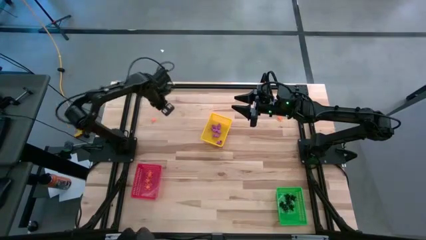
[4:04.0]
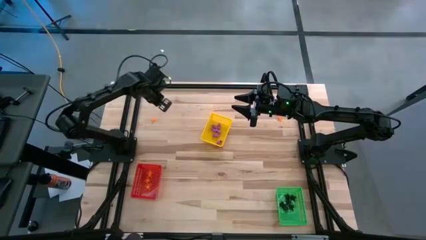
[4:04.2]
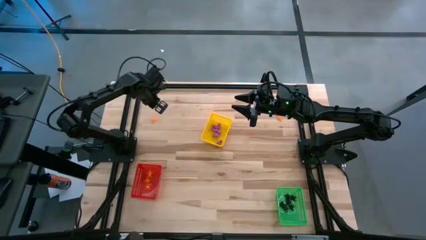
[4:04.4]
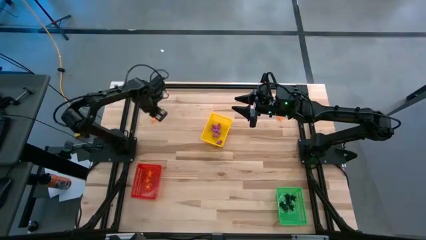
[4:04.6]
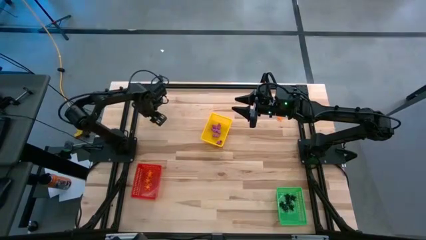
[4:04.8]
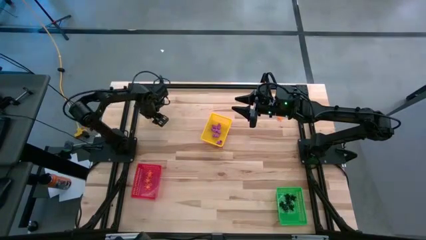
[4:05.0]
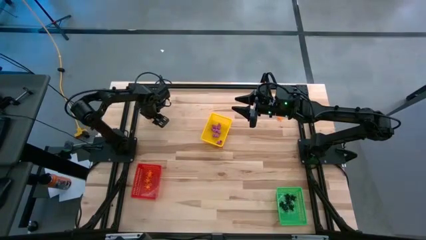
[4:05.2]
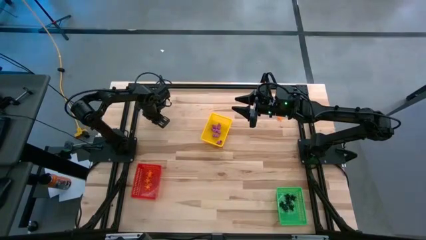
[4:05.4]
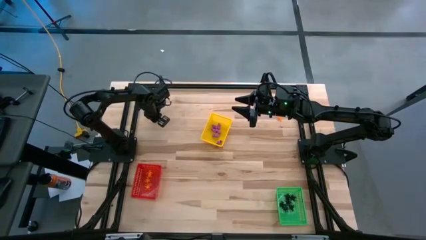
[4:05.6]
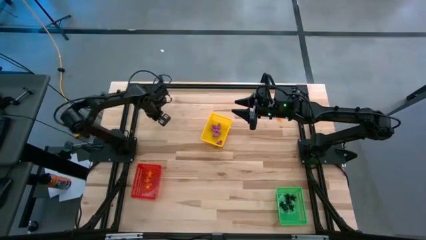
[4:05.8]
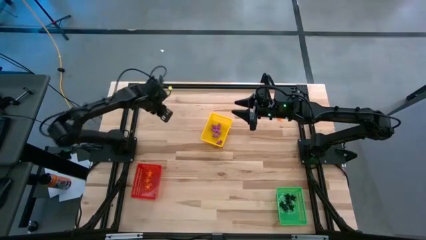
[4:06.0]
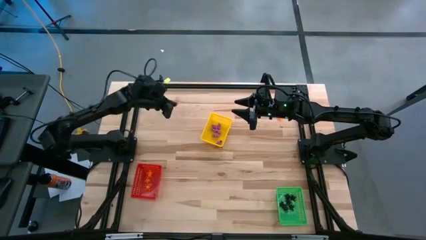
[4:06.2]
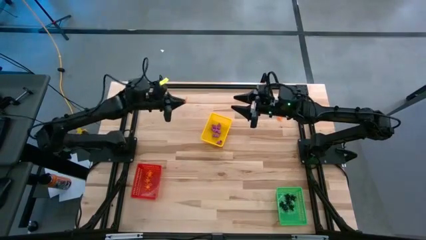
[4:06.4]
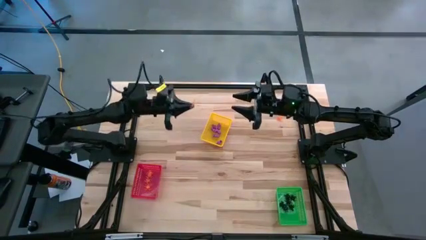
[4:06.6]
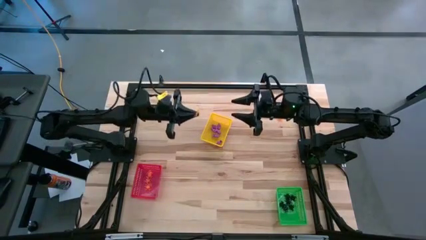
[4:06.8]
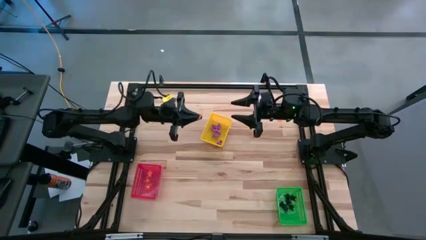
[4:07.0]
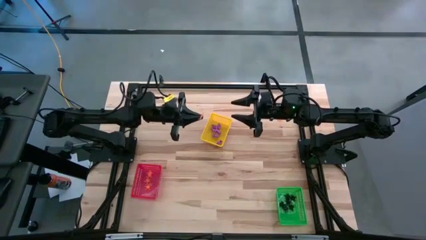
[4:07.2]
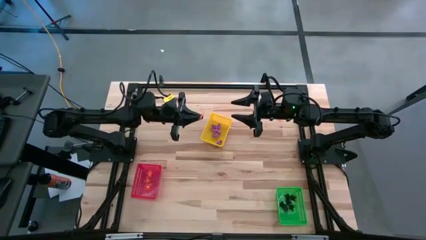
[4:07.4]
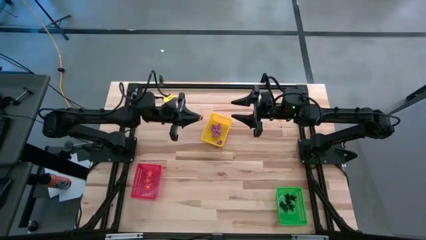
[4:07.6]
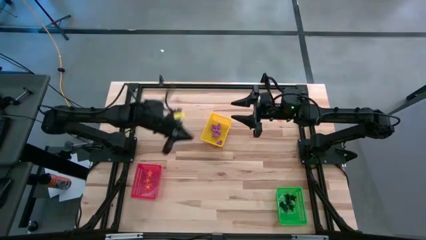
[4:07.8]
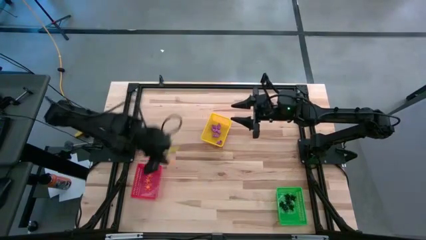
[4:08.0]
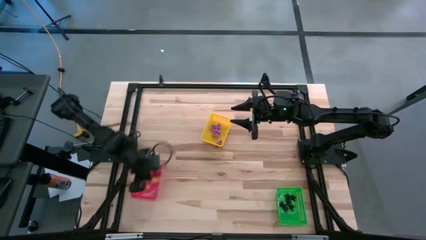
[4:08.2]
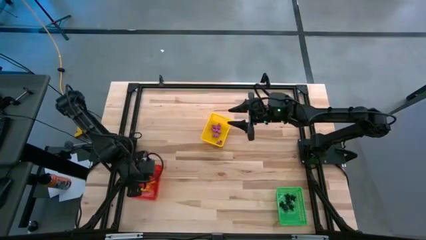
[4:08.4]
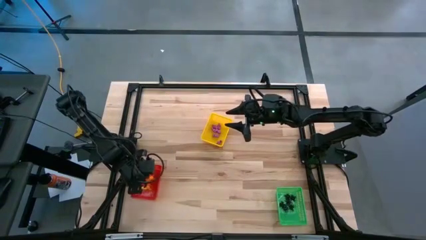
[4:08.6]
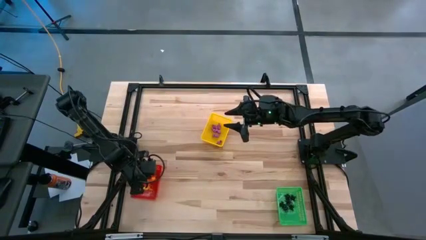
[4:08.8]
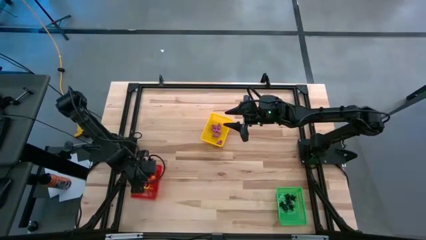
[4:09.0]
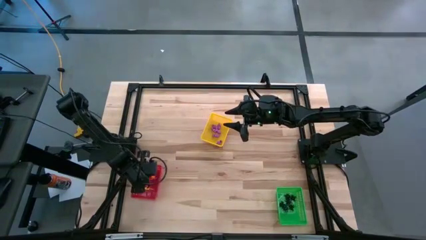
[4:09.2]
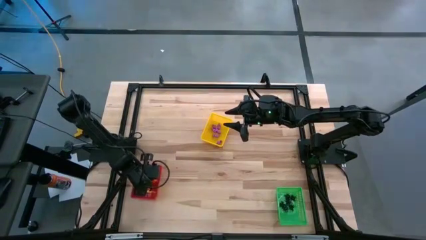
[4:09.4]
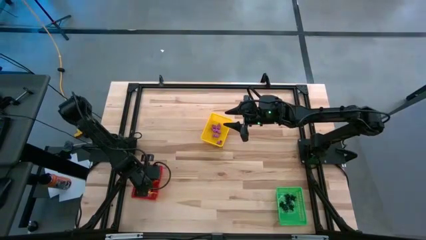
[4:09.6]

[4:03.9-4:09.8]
Task: Sort Halloween decoration
Put the left orange spider toy into the red bin

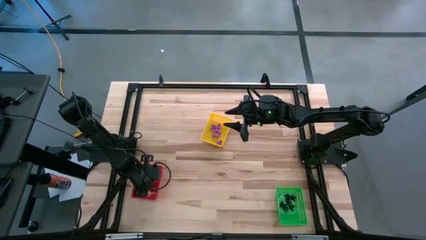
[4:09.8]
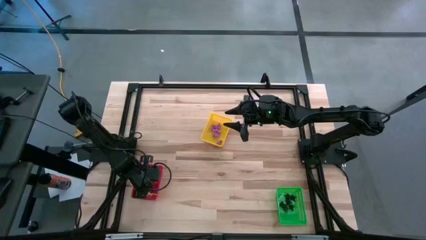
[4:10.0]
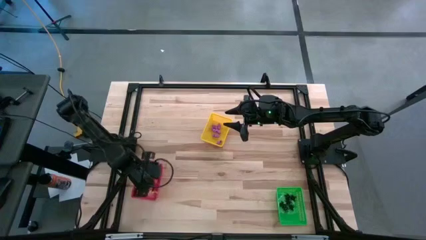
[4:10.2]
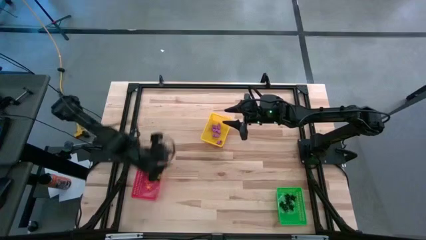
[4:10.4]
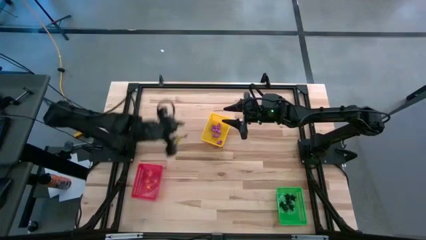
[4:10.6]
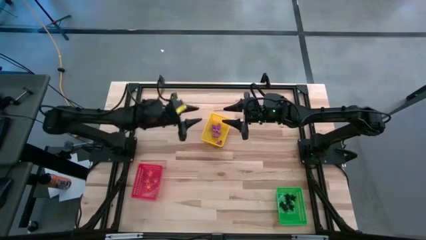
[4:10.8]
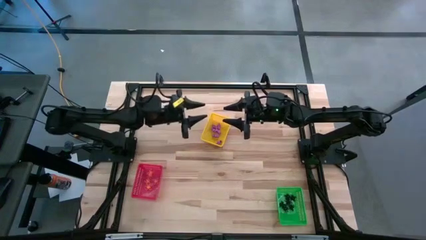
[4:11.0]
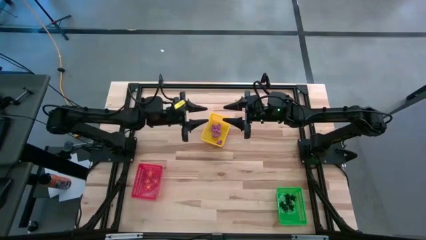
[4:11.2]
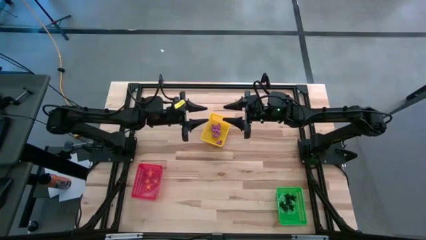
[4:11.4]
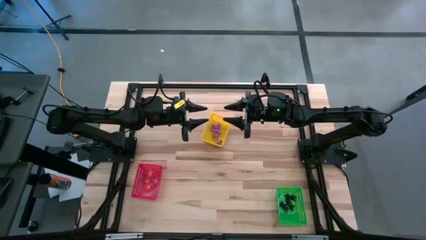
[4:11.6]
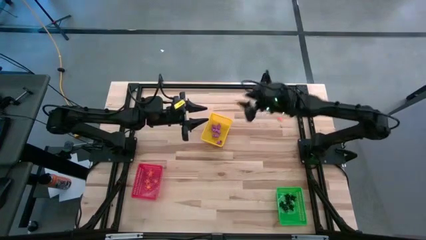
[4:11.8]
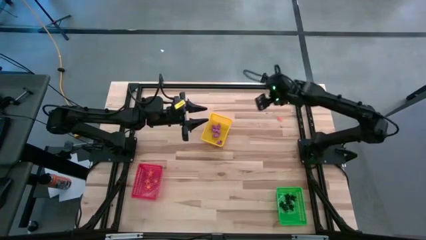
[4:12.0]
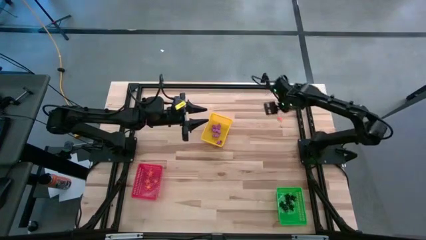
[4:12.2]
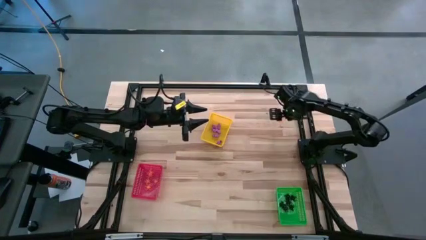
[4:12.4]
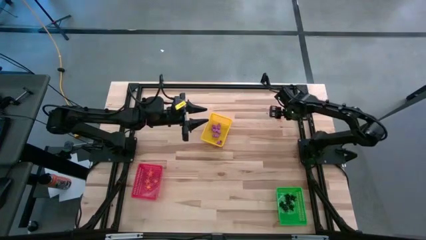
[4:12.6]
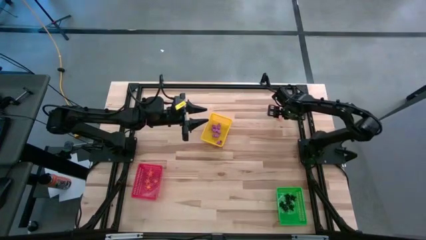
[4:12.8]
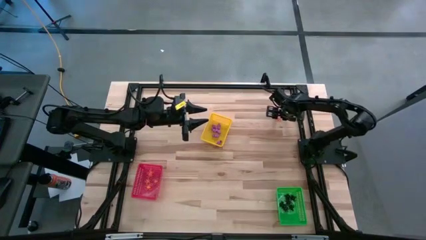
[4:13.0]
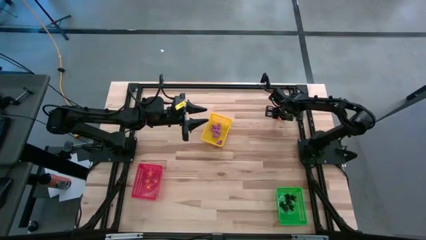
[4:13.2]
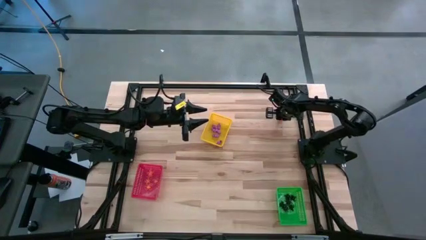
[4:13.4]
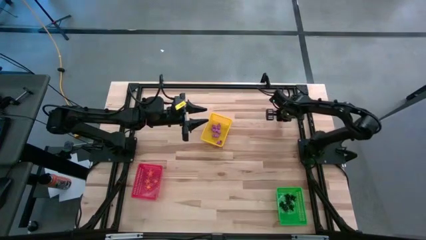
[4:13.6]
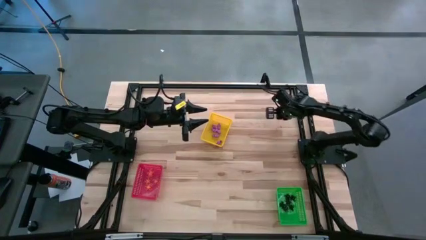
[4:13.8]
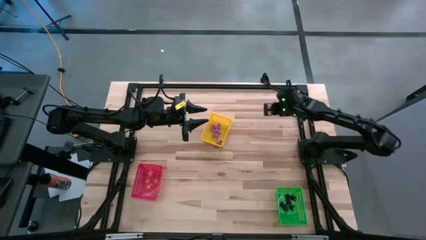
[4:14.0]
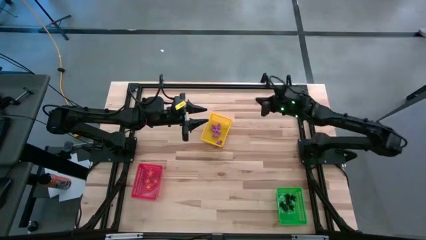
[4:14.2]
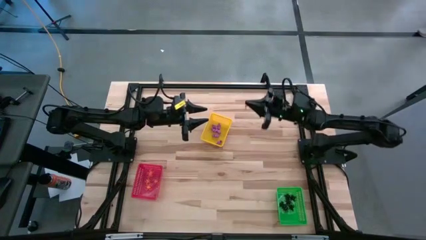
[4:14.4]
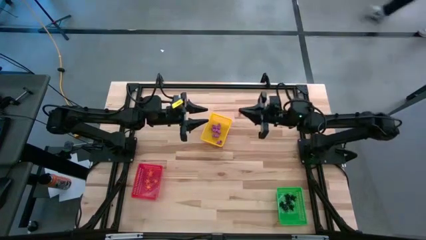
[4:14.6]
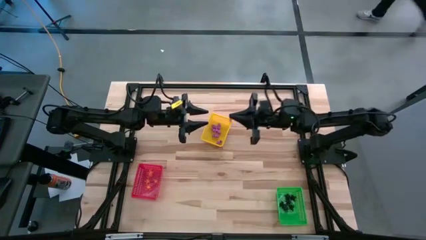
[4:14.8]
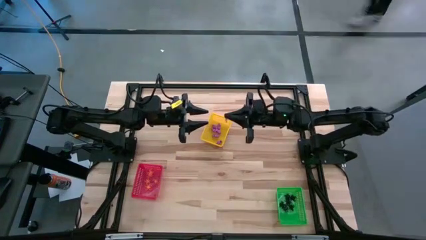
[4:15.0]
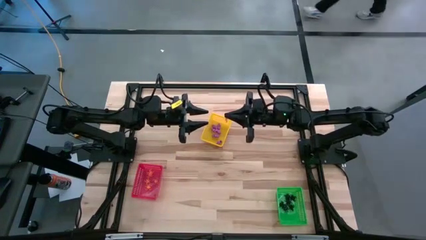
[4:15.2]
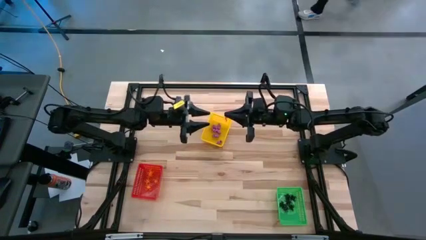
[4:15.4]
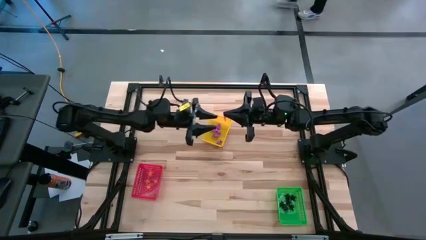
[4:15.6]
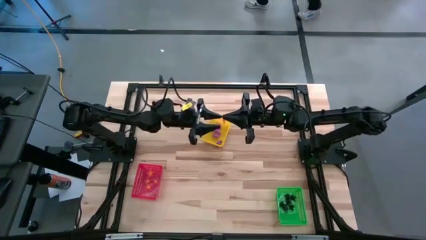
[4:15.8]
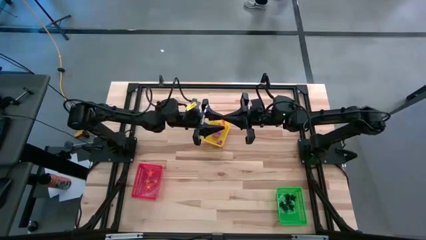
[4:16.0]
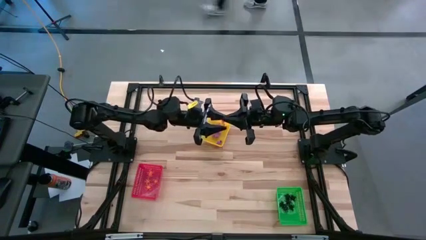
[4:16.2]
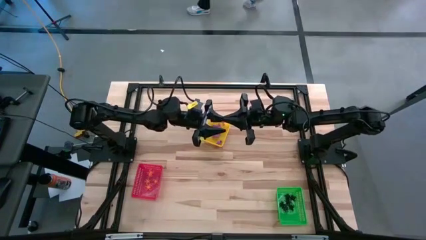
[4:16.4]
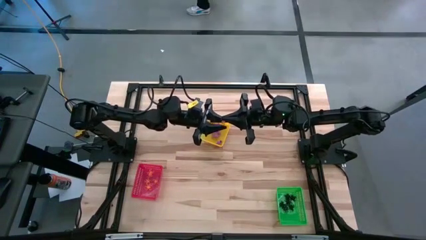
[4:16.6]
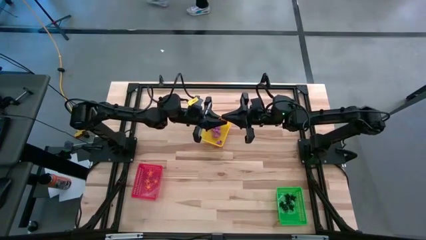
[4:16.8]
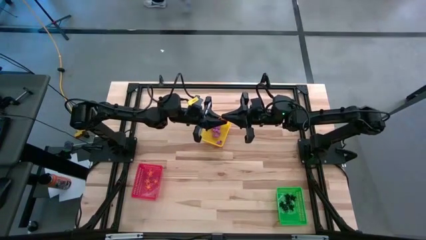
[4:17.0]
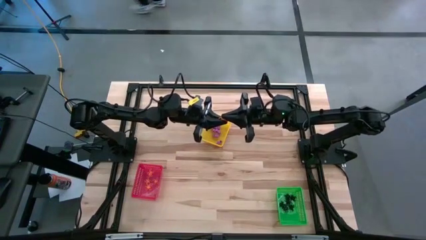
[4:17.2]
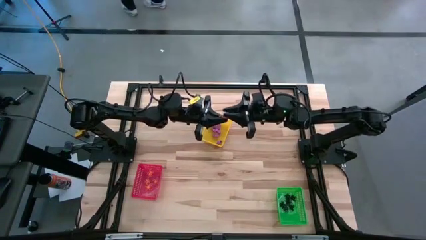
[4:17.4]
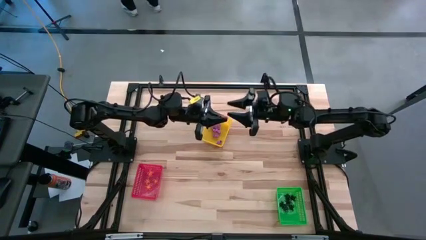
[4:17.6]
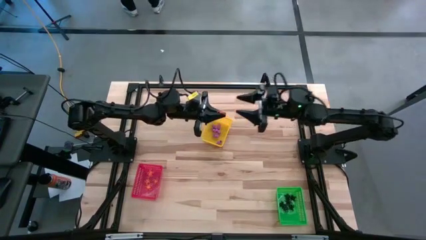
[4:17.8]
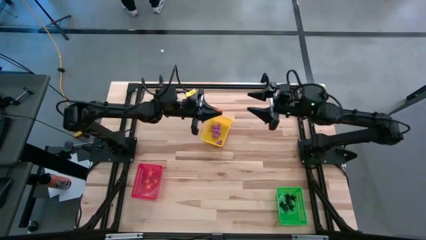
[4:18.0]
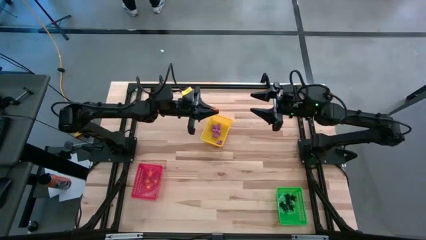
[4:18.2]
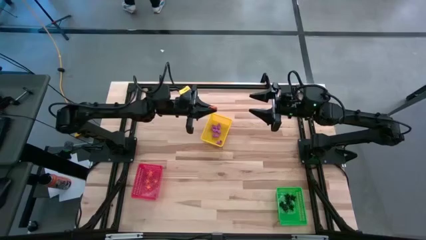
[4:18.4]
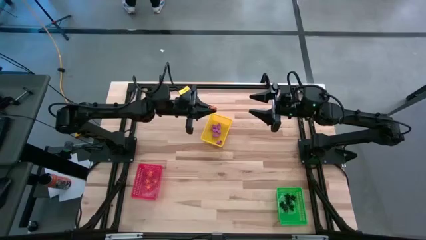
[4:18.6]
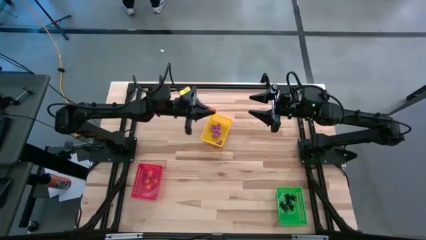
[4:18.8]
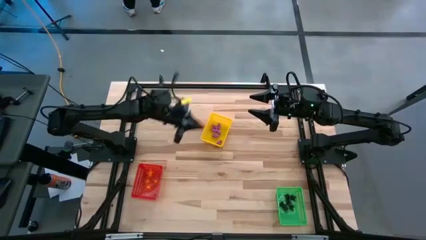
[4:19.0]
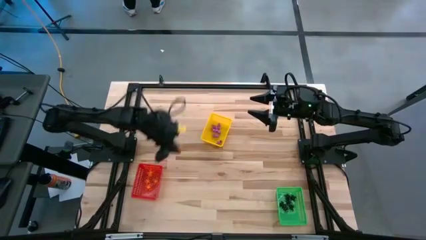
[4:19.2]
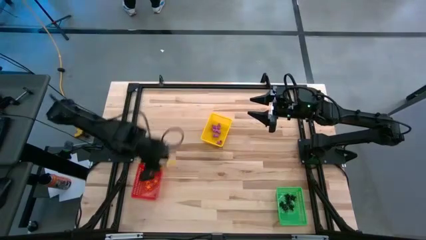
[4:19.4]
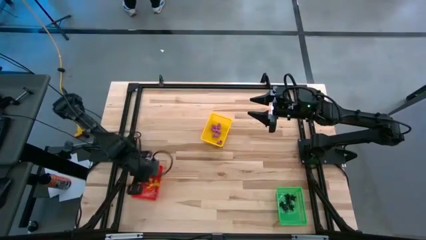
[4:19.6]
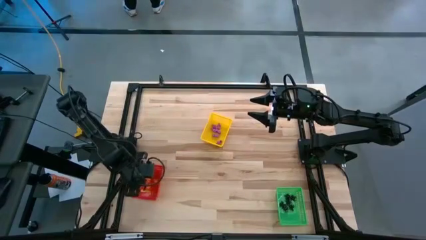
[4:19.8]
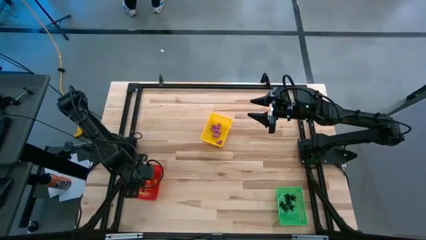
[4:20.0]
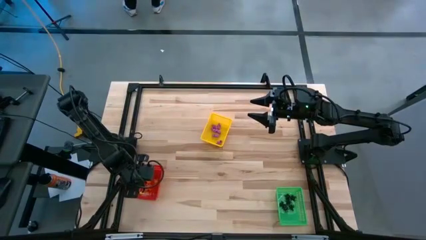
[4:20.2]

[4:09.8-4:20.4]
Put the orange spider toy into the red bin
